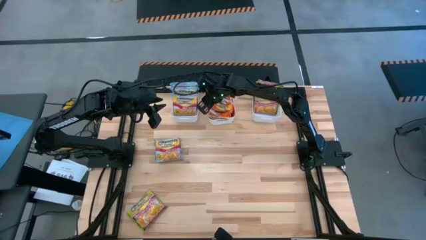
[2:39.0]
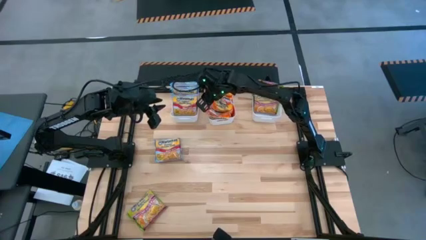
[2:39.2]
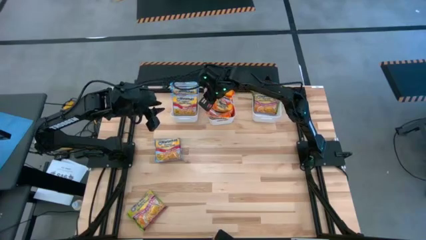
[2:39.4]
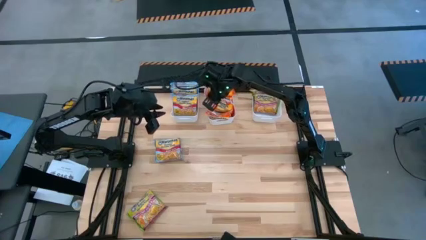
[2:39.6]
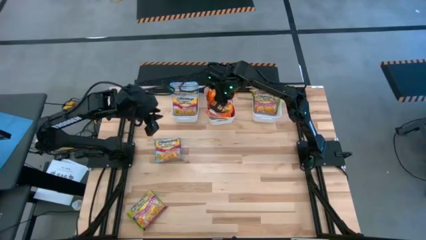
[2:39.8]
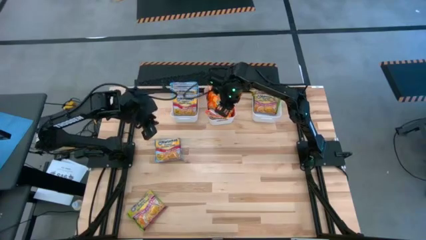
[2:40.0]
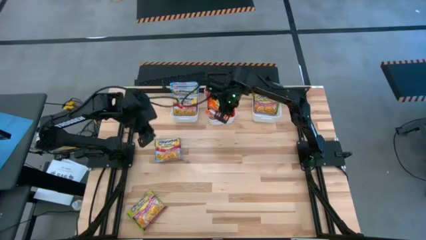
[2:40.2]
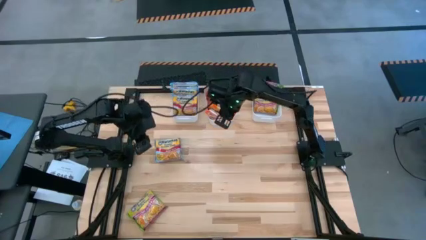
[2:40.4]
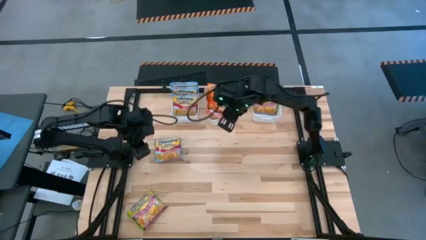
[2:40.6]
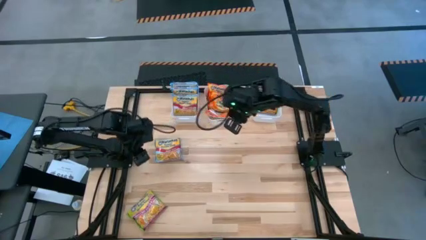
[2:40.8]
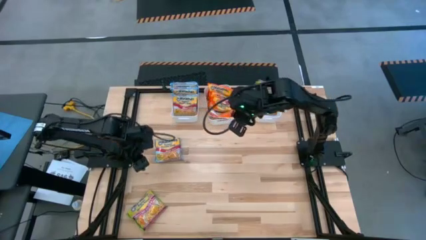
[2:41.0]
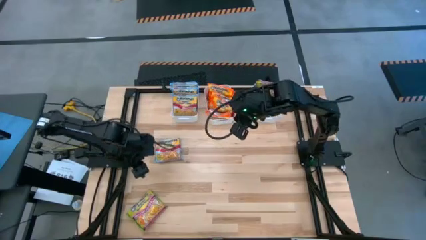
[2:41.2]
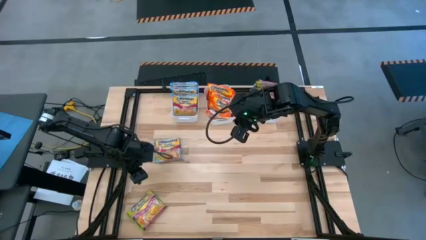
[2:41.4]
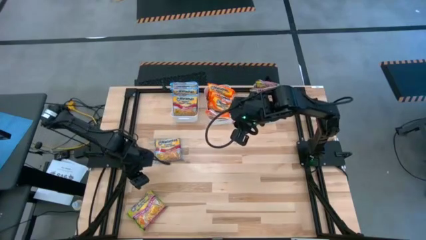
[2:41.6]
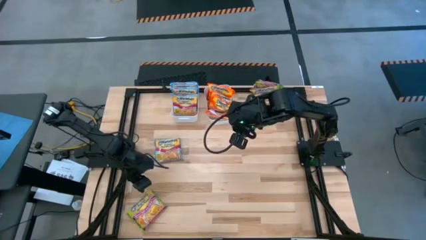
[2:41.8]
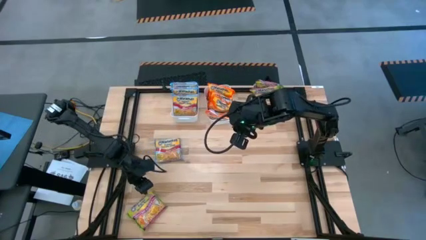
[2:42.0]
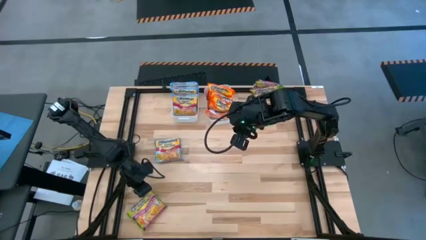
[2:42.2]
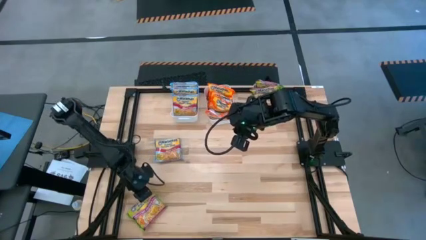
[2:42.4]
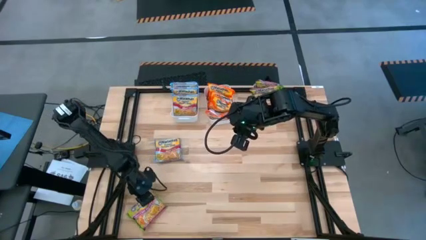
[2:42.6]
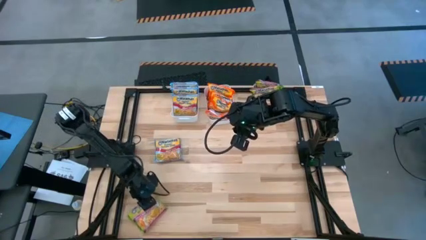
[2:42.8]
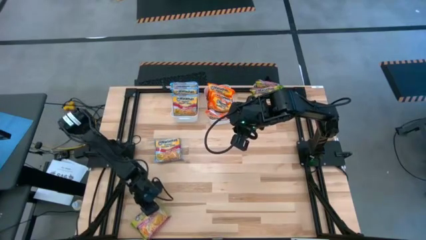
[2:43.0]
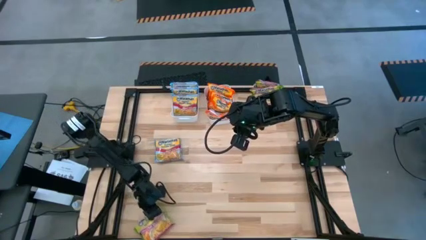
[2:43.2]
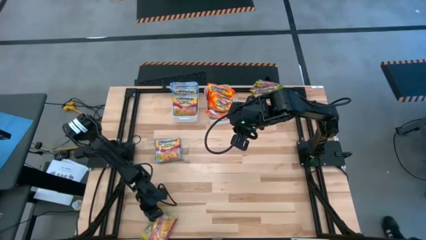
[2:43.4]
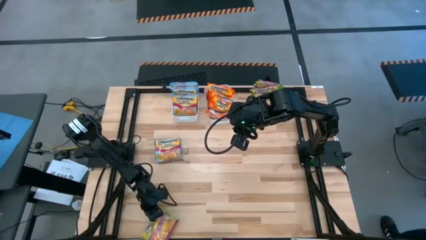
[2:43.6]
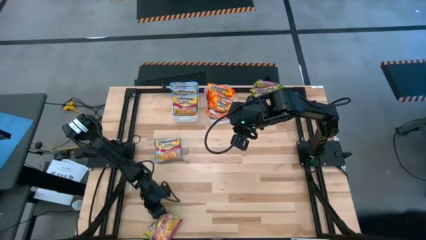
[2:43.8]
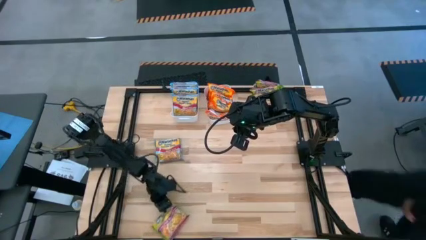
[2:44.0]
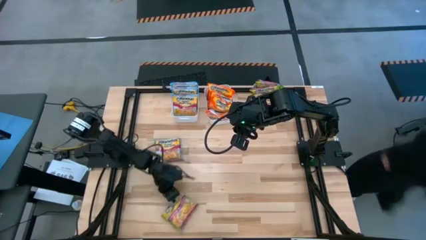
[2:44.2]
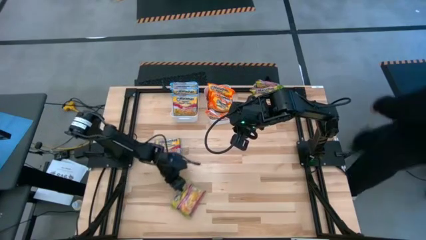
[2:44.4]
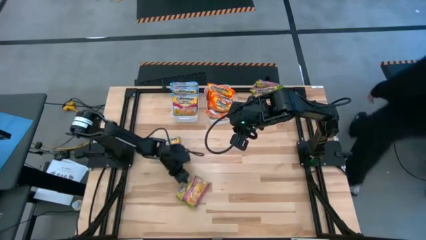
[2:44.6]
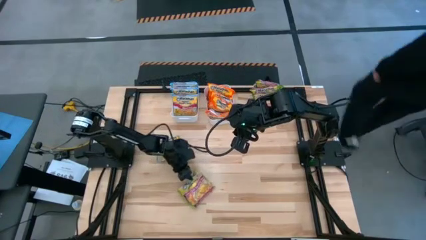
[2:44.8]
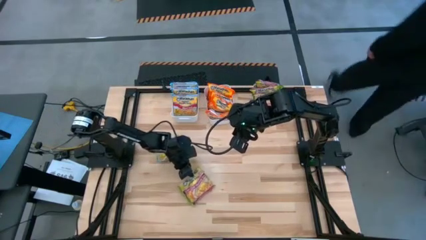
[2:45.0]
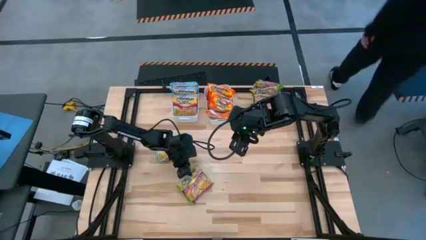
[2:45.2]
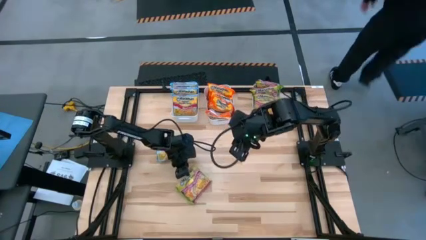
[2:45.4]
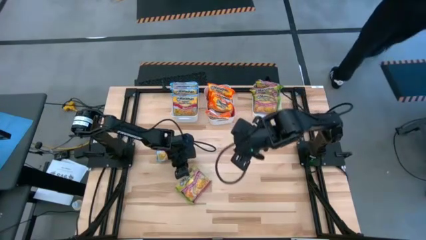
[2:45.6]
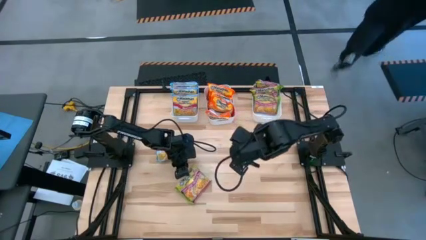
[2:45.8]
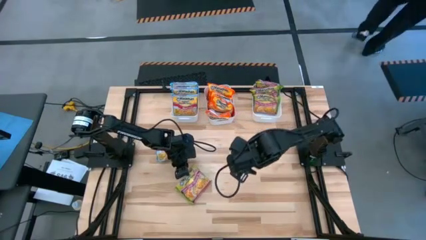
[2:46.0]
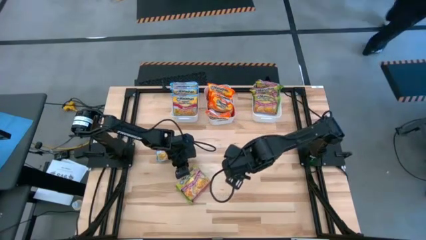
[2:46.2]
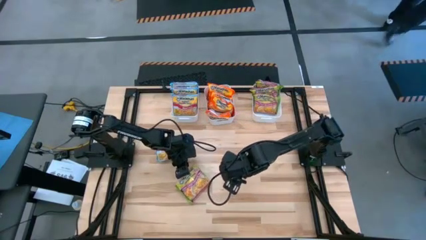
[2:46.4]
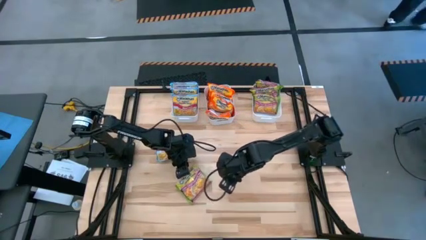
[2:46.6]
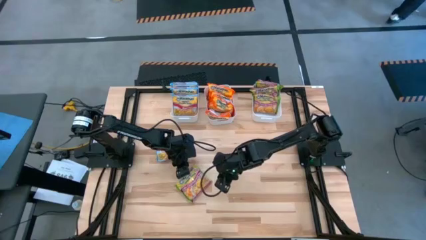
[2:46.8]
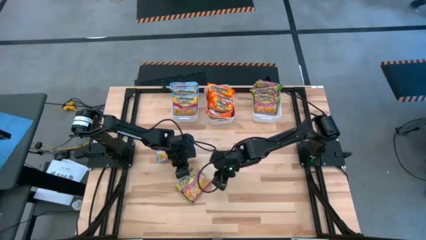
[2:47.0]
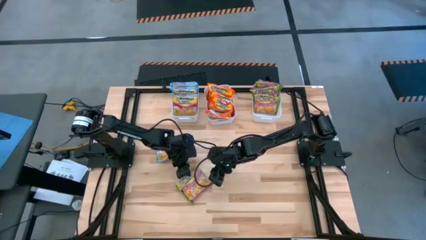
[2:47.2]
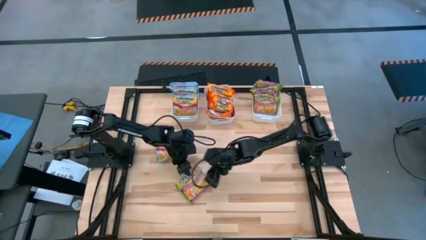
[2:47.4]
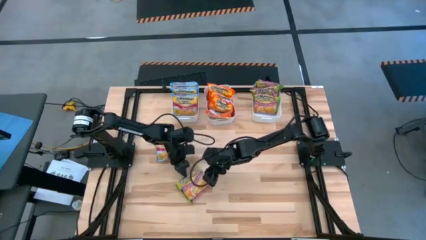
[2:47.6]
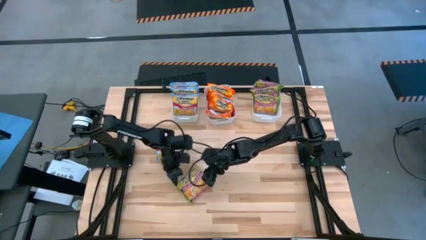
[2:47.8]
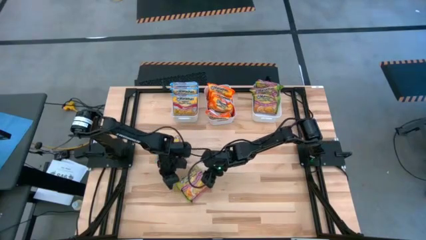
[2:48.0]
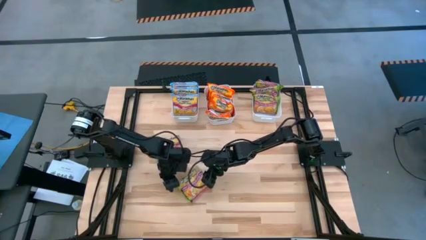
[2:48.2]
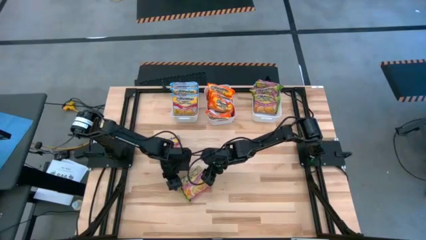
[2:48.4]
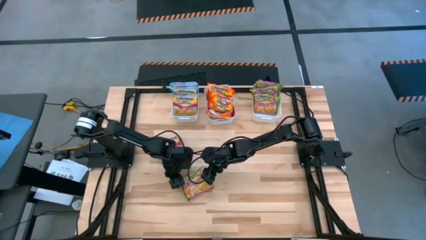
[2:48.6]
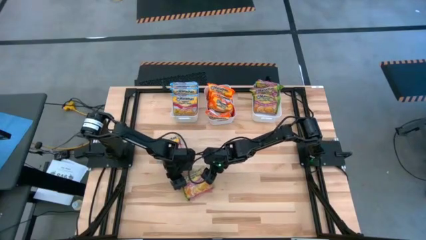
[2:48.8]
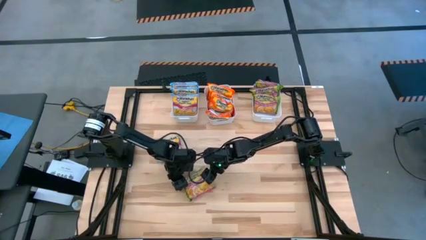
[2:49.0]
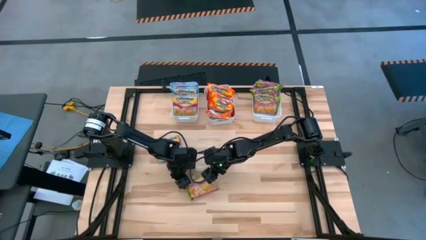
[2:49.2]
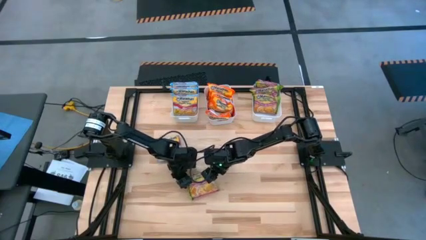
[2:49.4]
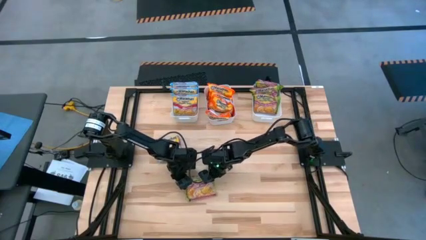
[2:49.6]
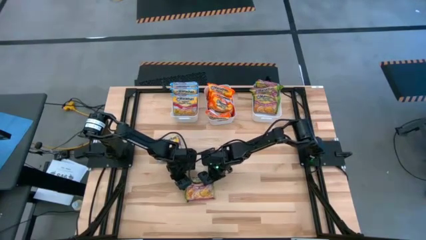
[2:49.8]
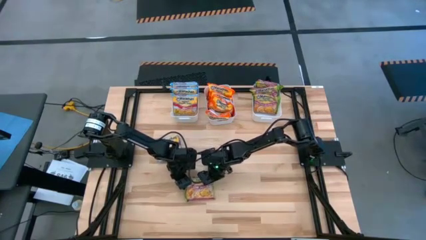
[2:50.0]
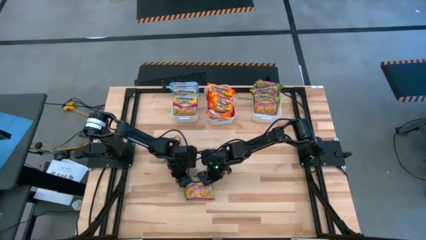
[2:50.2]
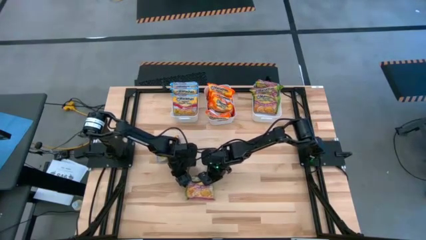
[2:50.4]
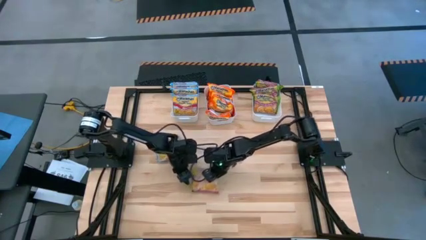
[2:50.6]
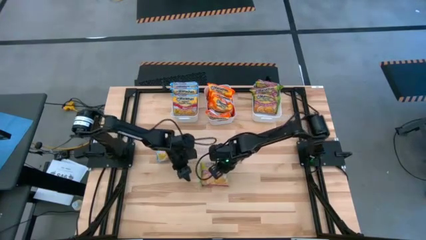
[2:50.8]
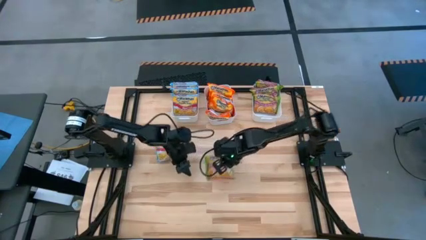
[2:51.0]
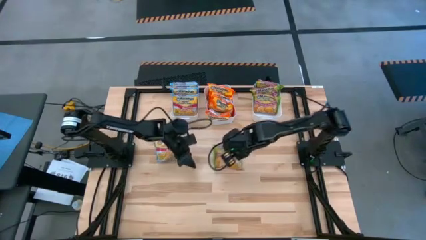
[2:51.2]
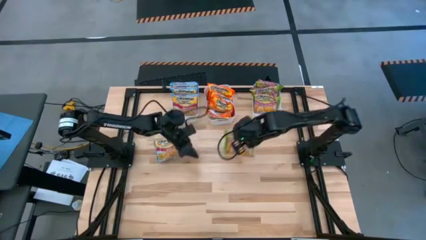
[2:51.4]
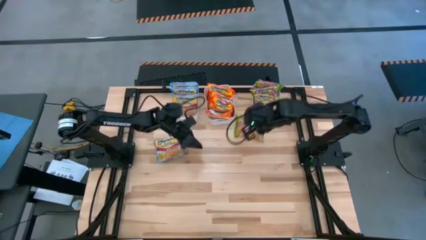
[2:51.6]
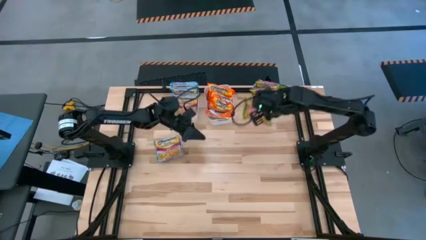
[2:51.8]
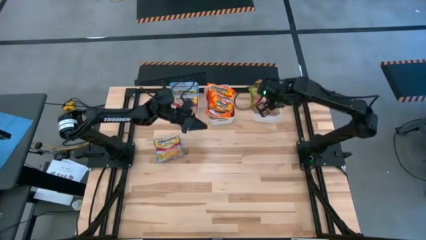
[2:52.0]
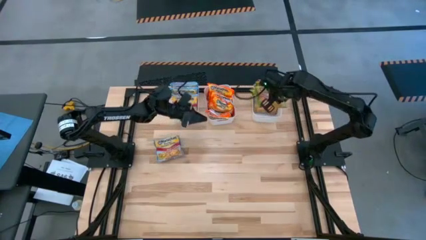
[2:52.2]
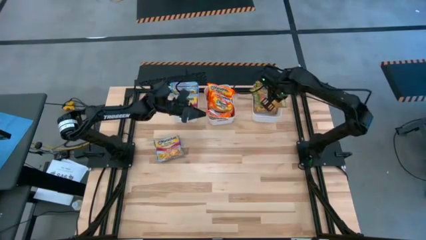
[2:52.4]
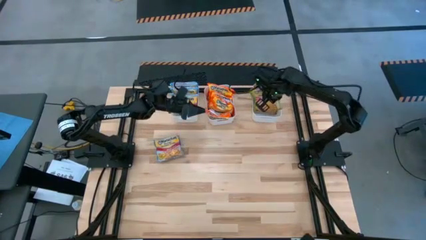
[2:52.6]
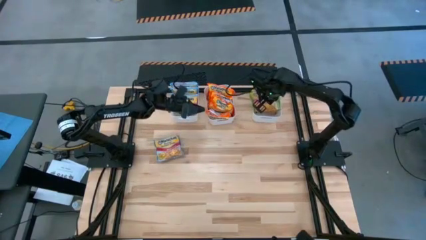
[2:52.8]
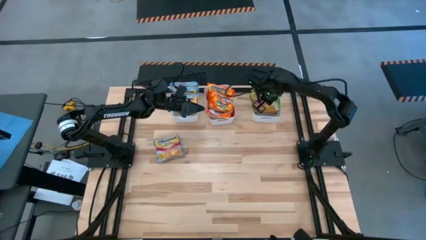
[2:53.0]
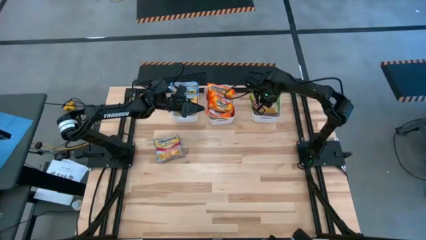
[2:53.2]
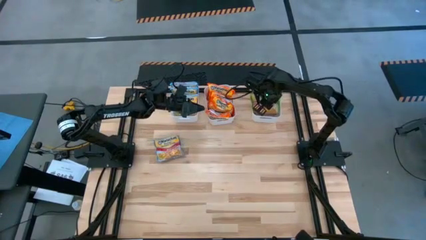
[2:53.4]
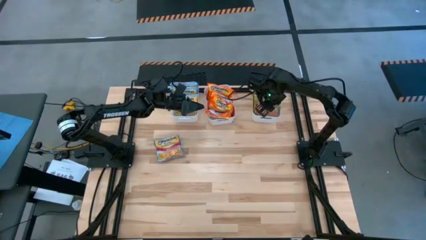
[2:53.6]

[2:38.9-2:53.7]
Task: Sort Maruchan noodles
Put the green noodle pack into the right white bin

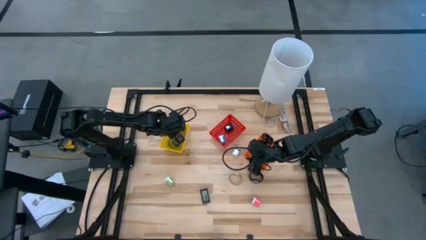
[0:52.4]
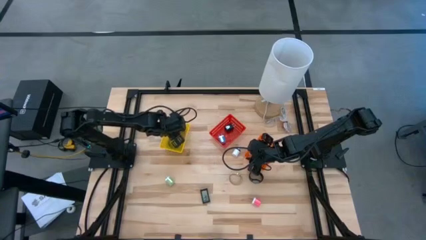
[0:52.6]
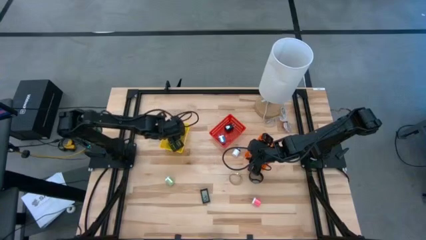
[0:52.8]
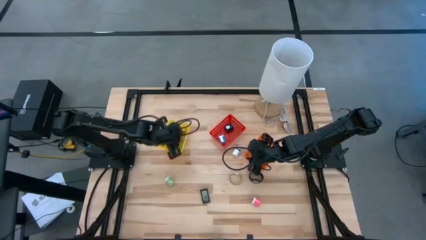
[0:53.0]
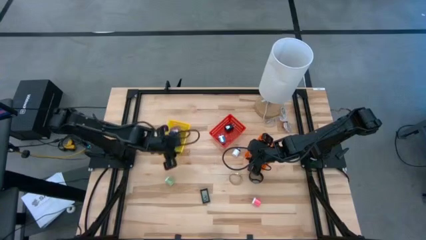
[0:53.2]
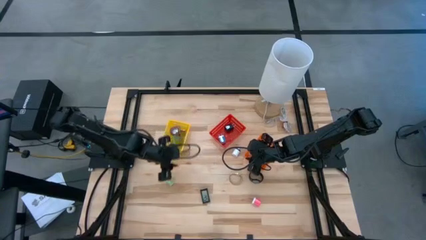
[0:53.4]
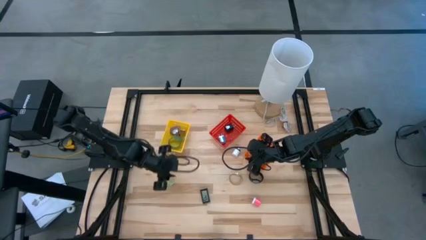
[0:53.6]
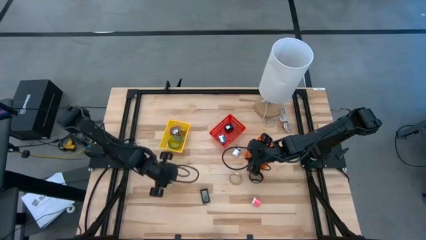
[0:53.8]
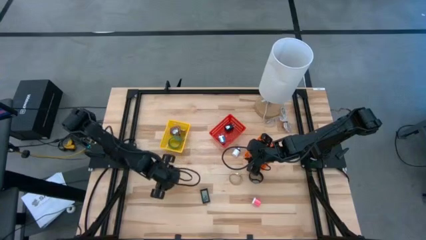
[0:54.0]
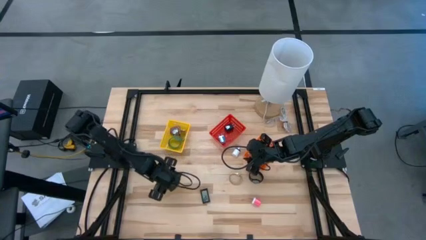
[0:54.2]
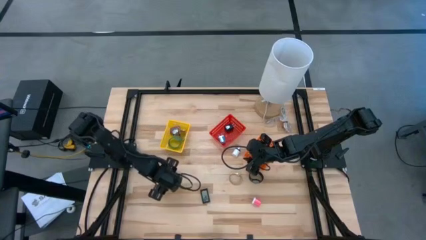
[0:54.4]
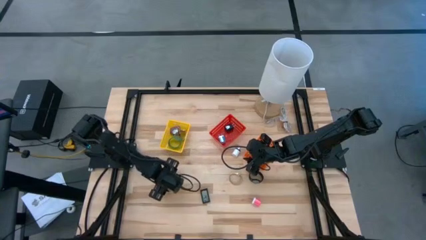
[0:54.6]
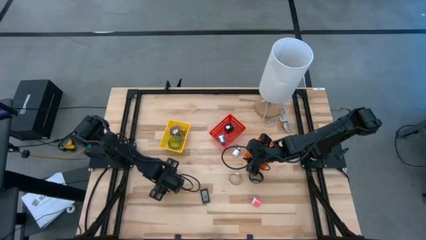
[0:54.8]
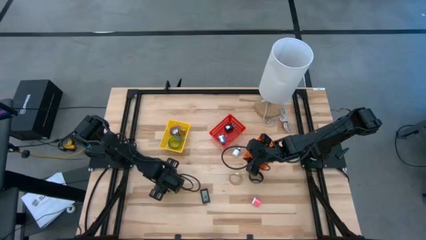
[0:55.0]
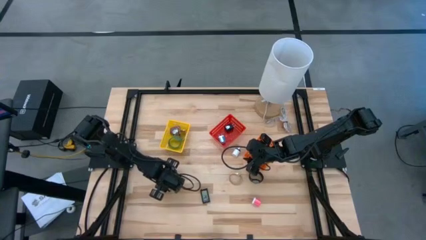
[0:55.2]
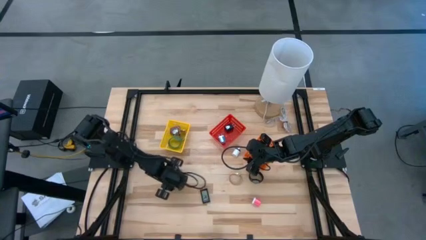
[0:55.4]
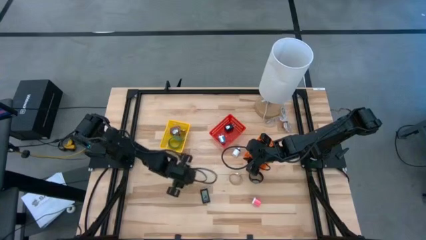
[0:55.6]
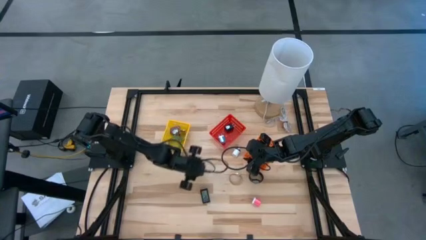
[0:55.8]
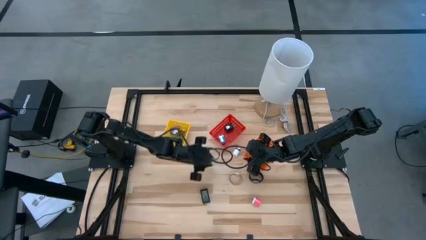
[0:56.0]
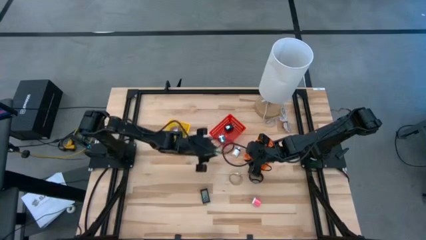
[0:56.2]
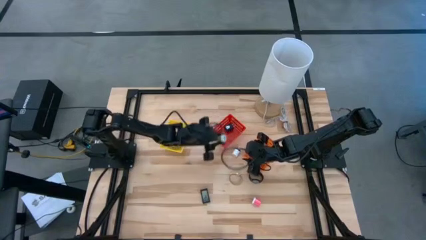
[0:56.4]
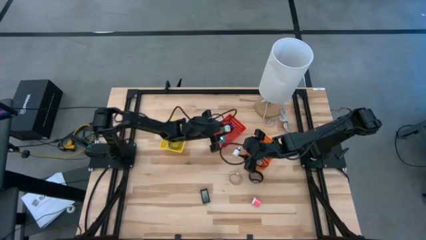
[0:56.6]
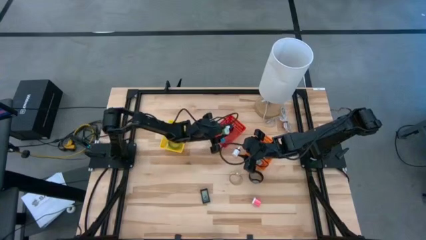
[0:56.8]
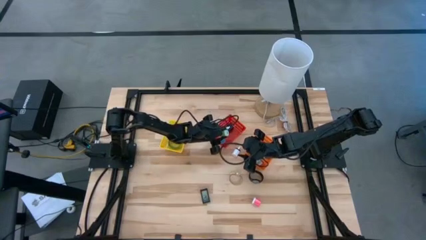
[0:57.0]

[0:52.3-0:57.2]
Task: Pick & Place Office items
Put the green charger adapter into the red bin
